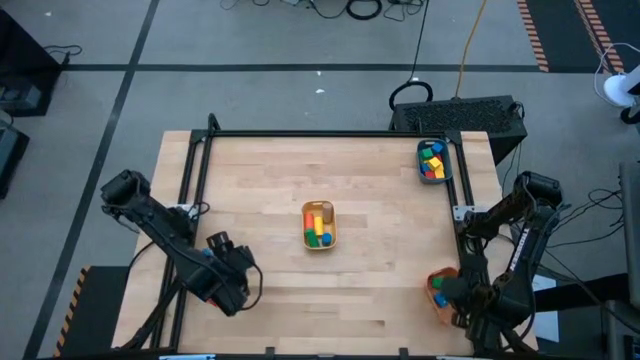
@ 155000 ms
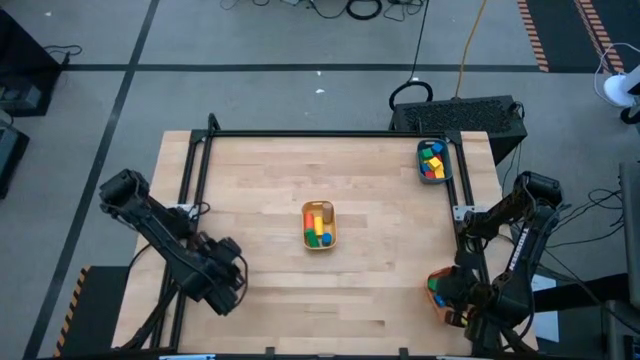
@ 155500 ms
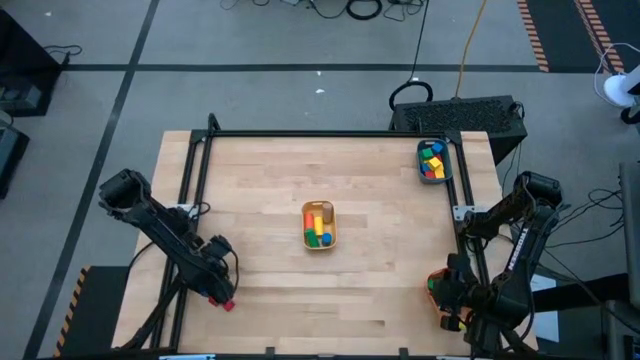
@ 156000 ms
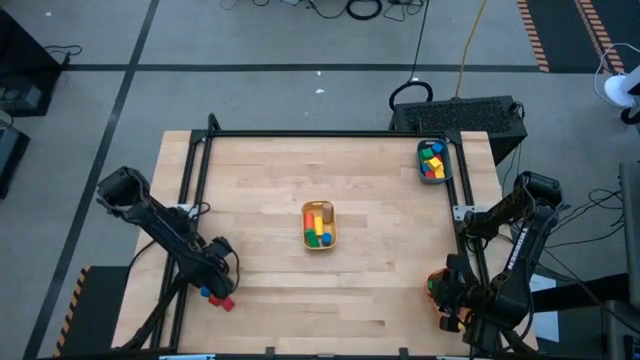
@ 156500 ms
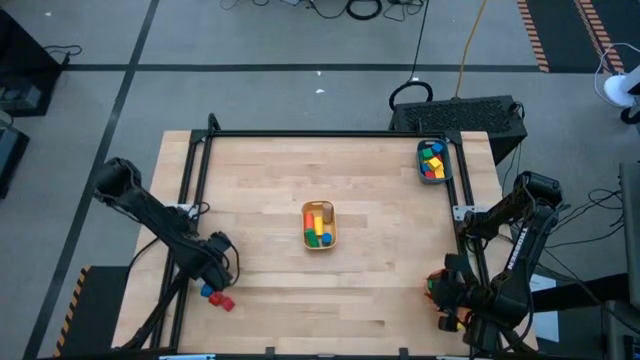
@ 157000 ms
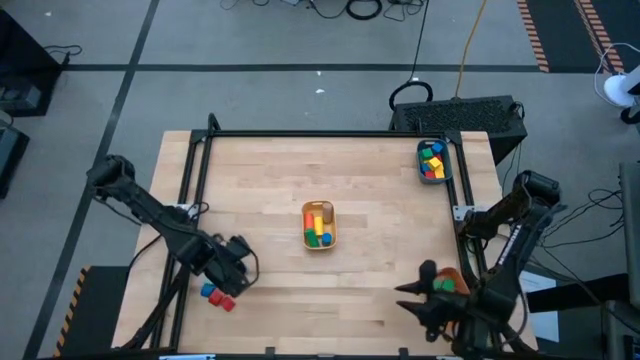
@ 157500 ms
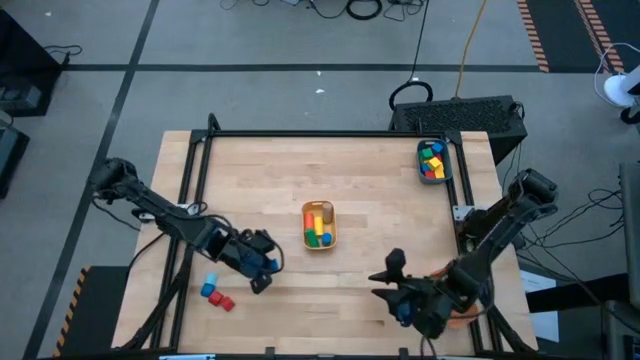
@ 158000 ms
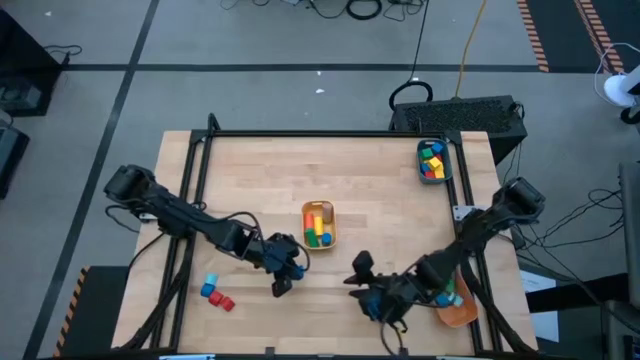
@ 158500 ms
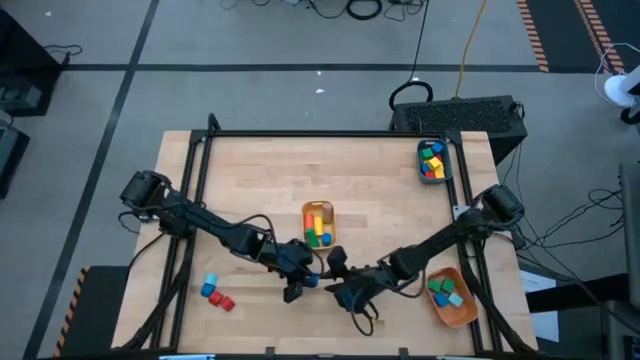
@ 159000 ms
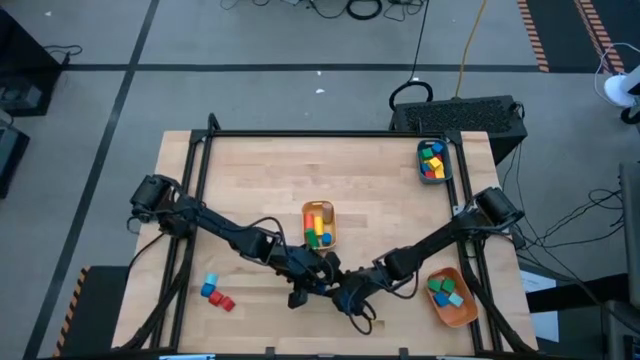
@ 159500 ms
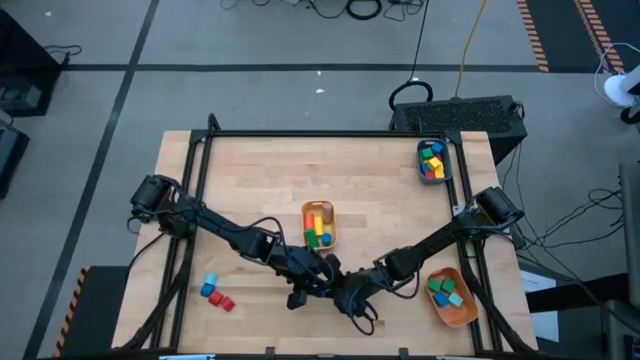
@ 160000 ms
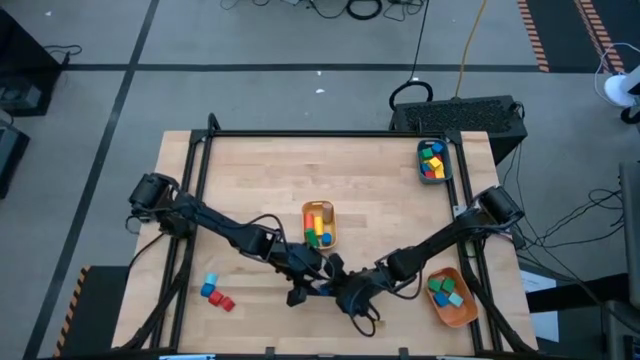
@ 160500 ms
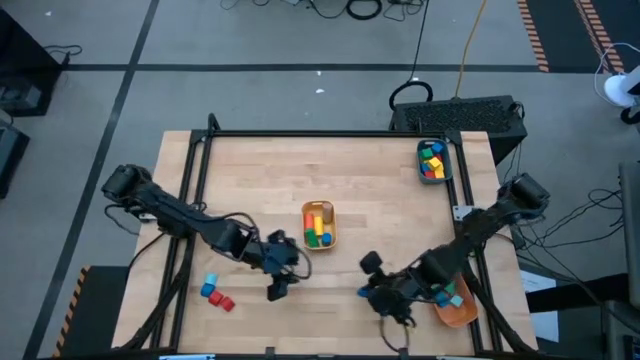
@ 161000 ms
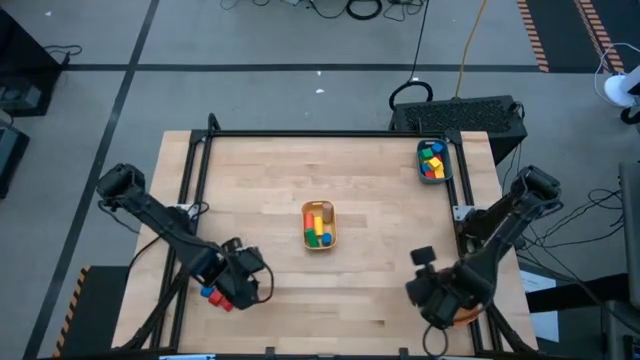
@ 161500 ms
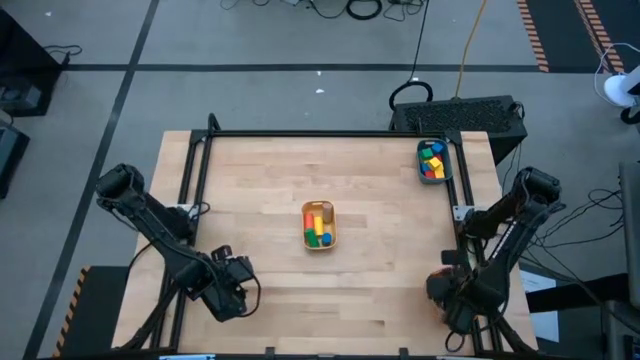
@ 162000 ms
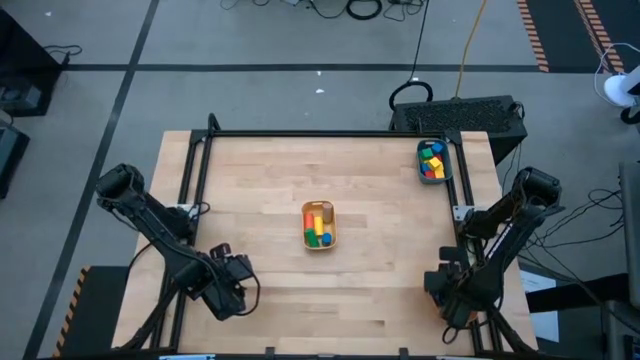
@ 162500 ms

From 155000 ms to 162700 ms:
Task: Sort blocks by size
Put the blue half-circle block into the orange bin

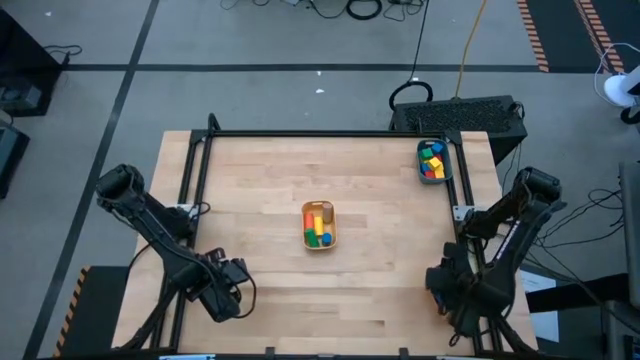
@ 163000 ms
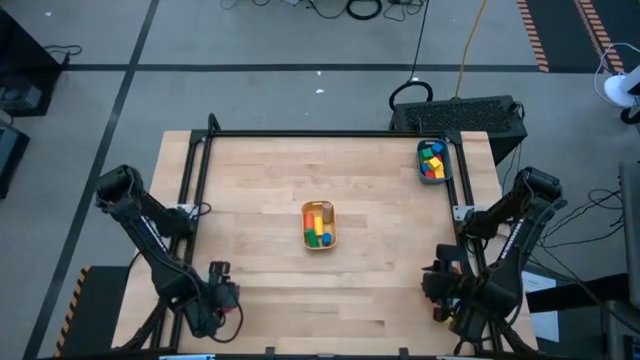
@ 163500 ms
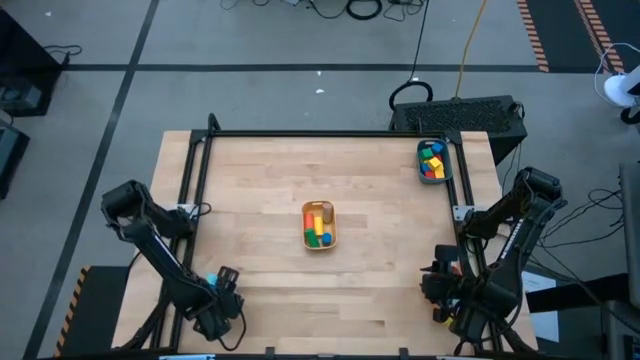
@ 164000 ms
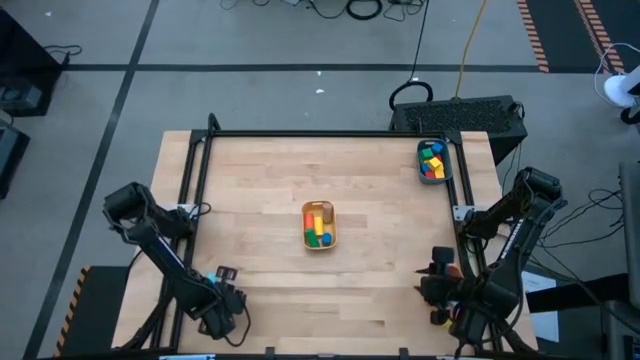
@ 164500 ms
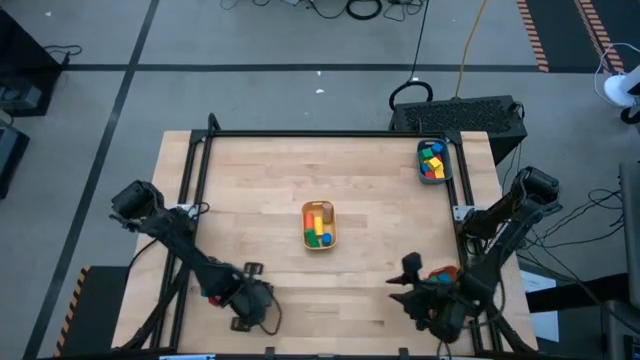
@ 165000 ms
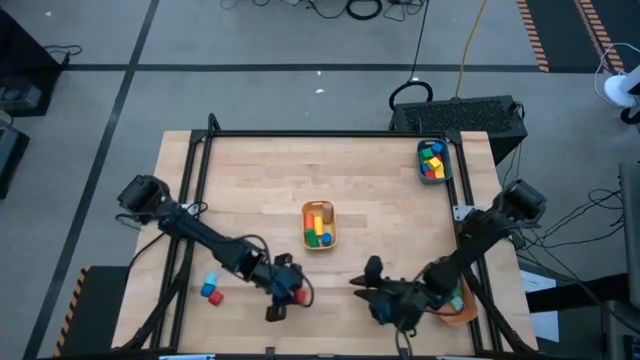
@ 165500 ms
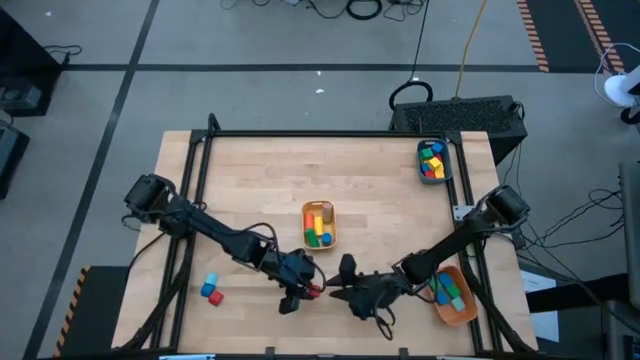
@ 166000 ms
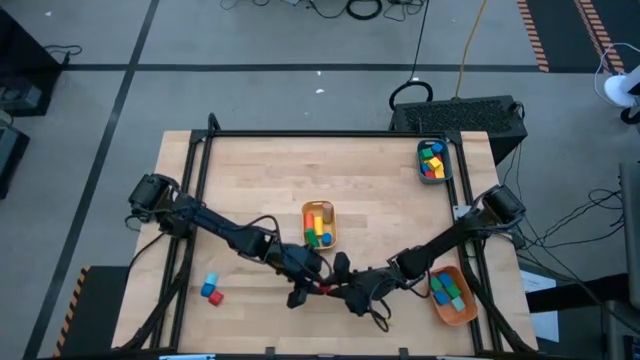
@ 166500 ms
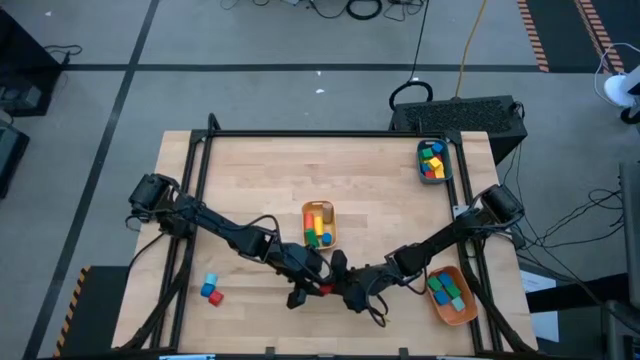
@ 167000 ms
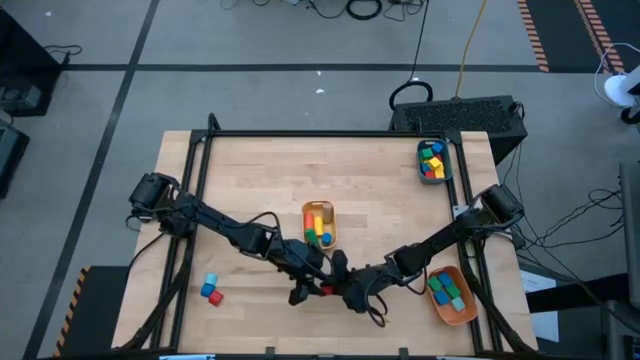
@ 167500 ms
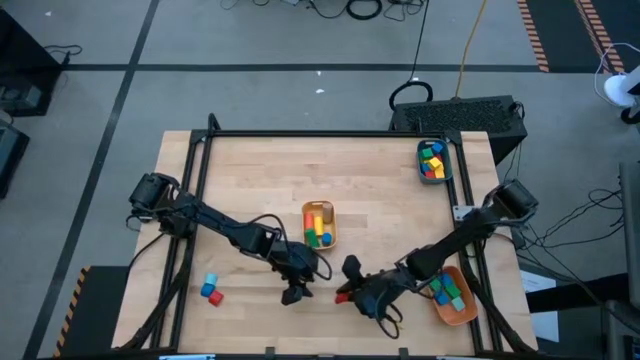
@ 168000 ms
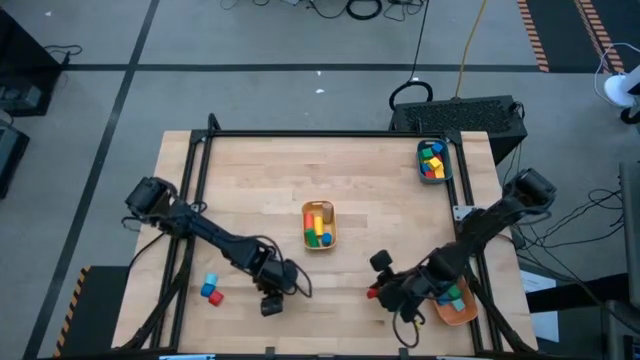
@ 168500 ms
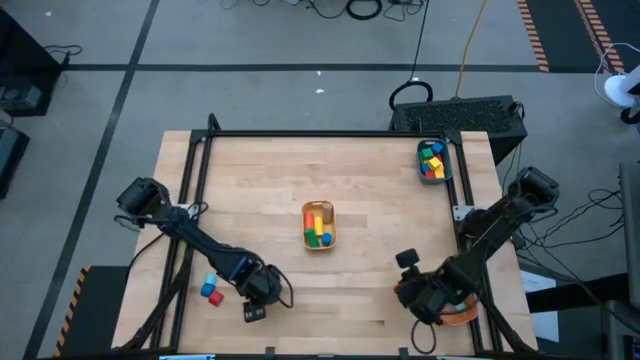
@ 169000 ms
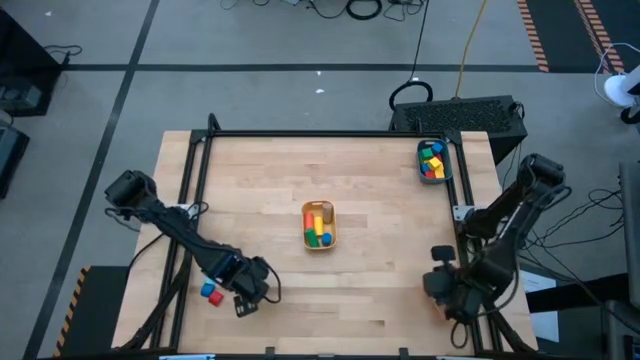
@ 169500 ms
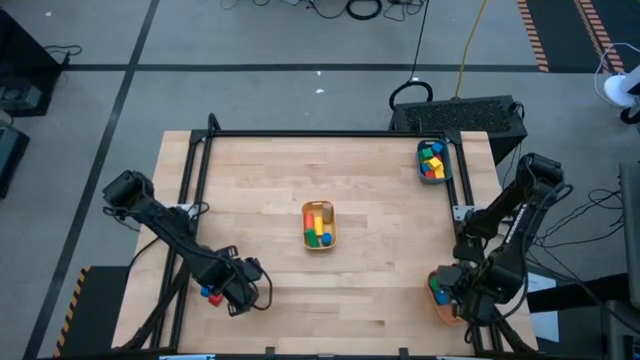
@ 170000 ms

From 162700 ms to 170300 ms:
Put the red half-circle block into the orange bin

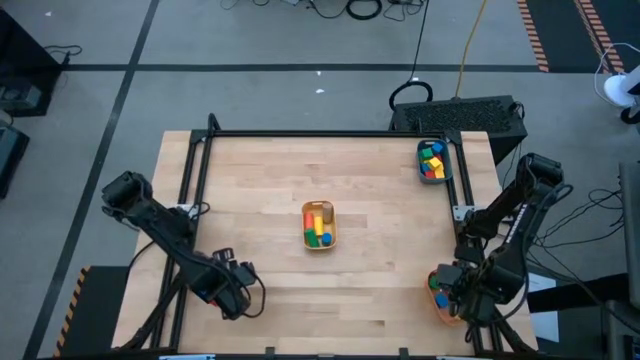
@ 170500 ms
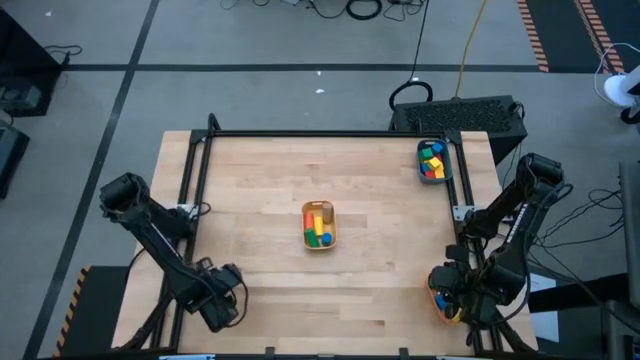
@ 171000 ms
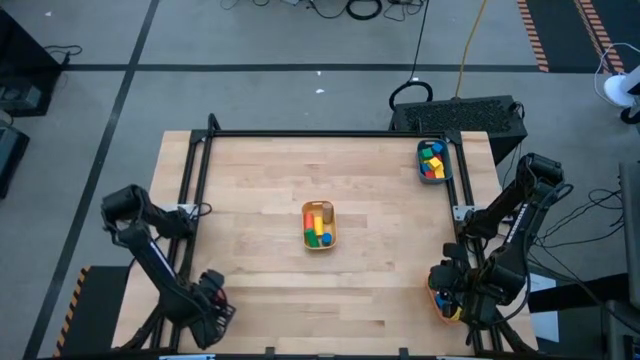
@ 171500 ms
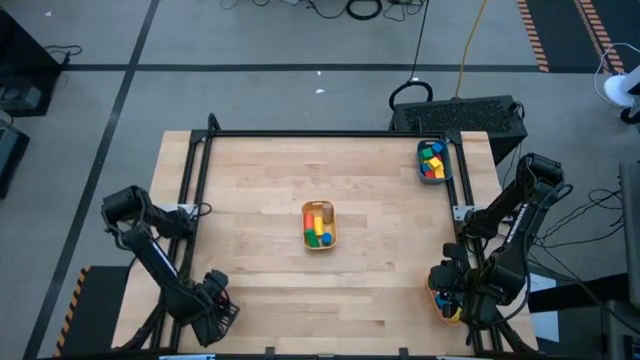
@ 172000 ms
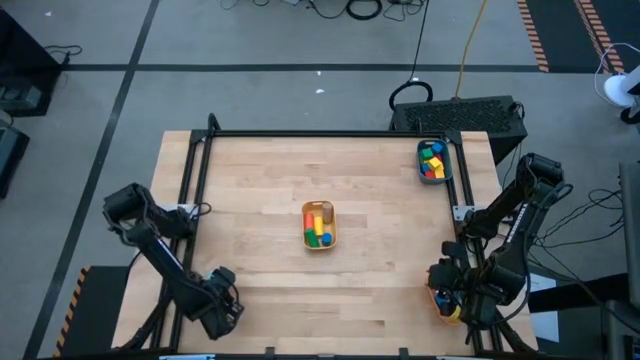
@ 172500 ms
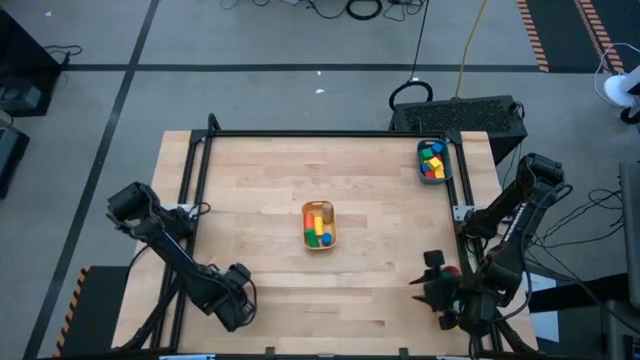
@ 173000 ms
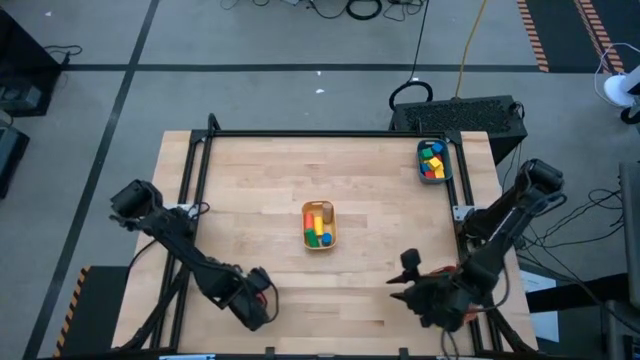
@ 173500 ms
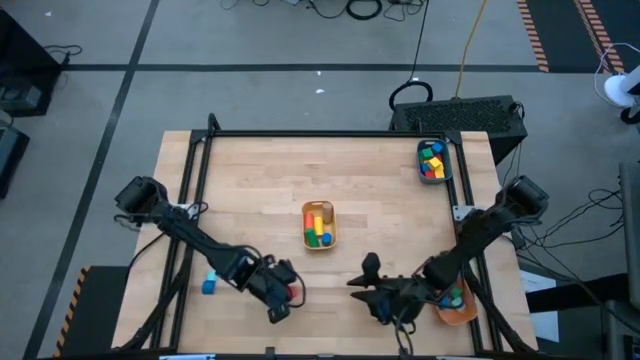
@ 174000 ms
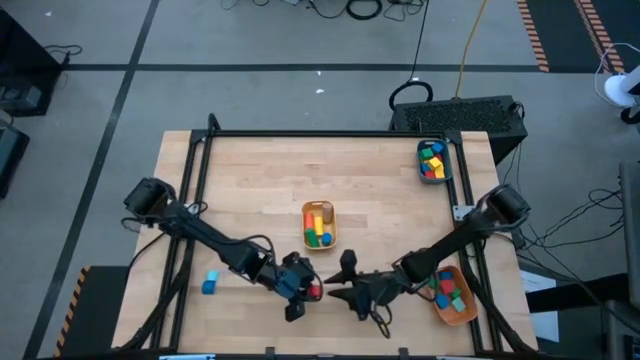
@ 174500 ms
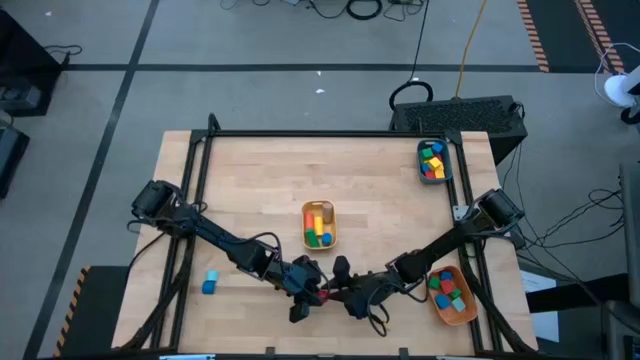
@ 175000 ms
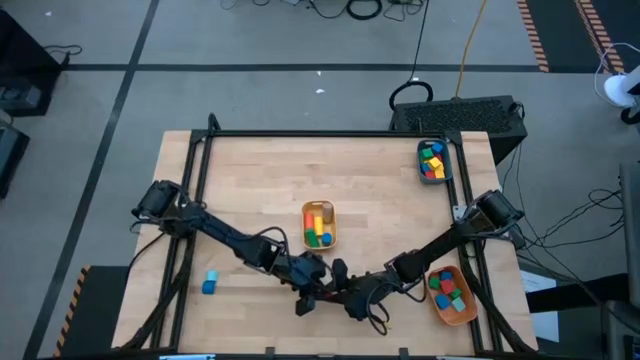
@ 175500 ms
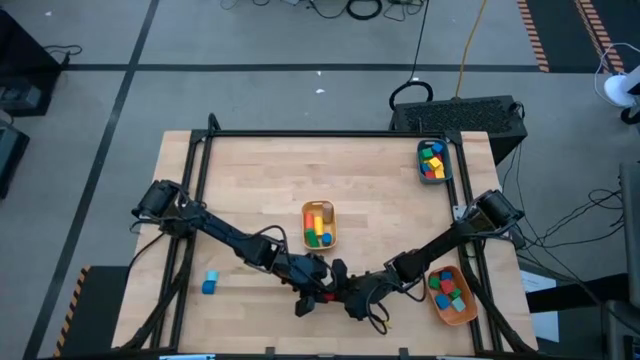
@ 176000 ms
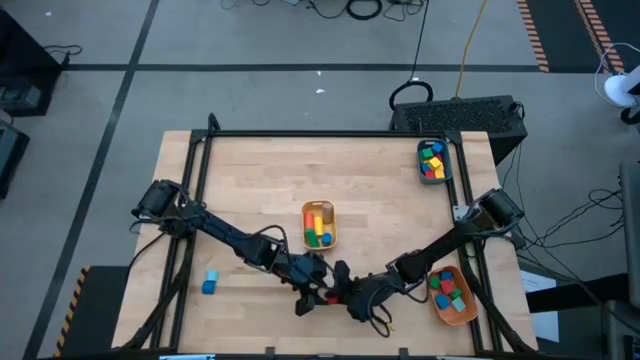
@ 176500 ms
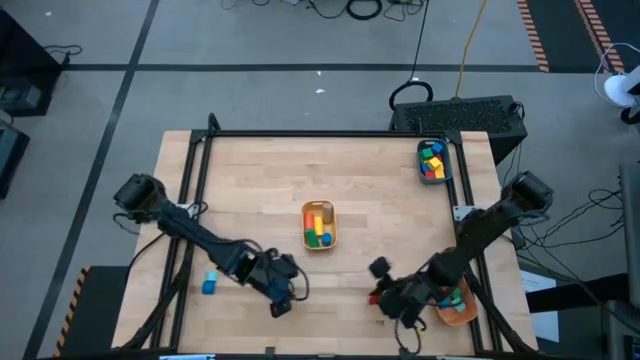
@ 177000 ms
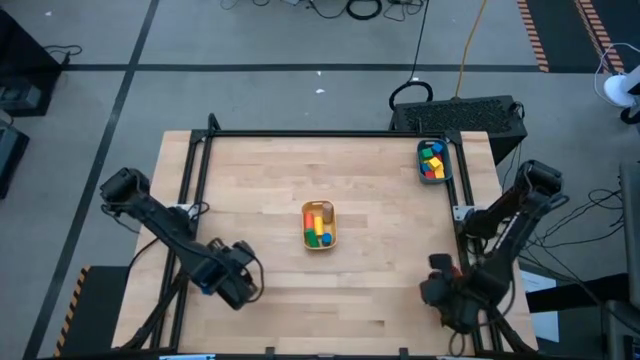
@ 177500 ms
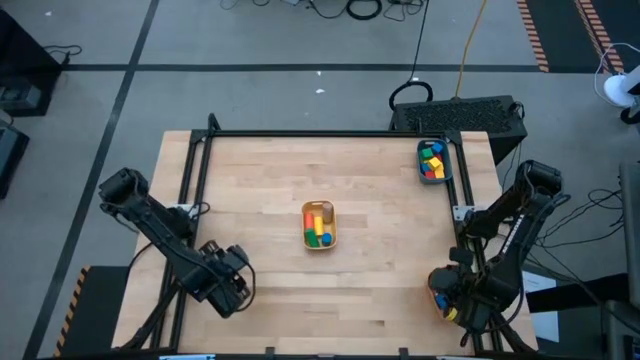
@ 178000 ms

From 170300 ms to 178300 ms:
Put the red half-circle block into the orange bin
